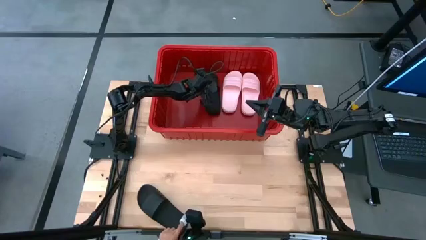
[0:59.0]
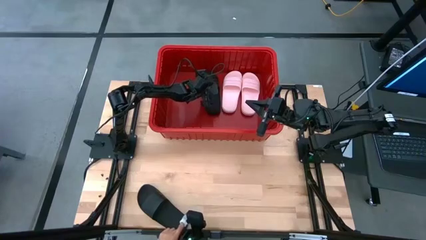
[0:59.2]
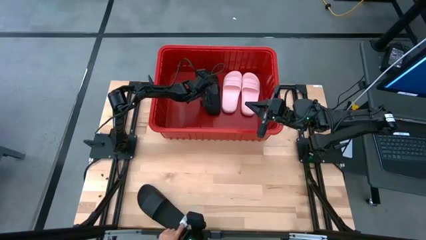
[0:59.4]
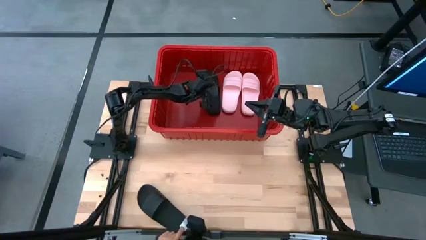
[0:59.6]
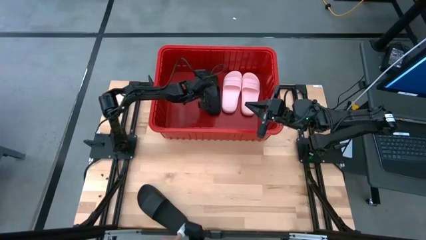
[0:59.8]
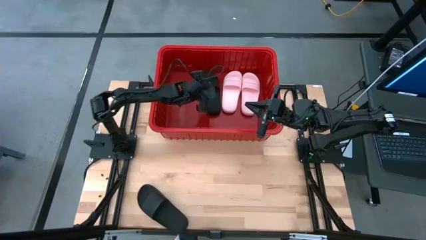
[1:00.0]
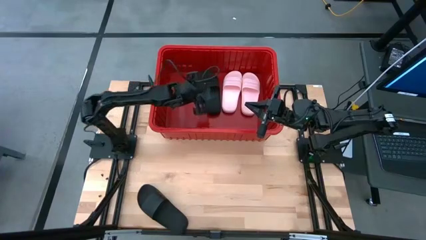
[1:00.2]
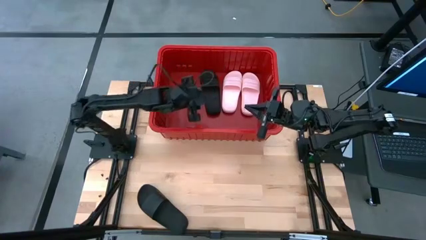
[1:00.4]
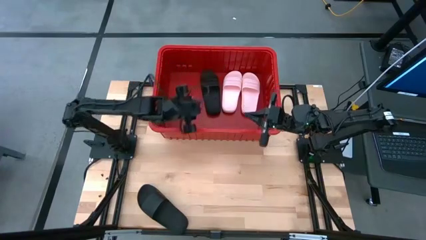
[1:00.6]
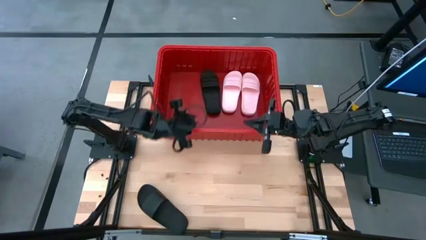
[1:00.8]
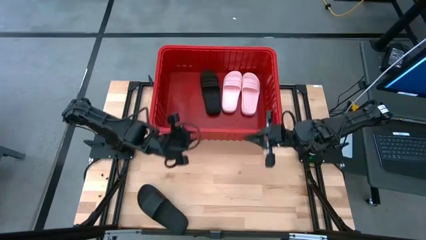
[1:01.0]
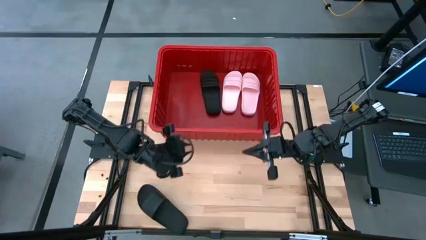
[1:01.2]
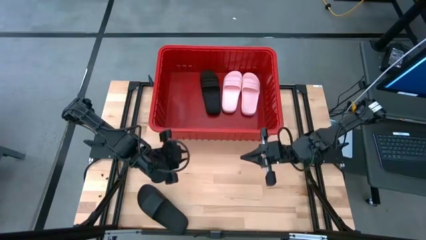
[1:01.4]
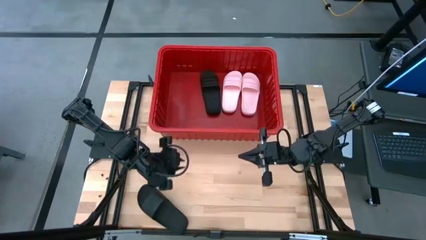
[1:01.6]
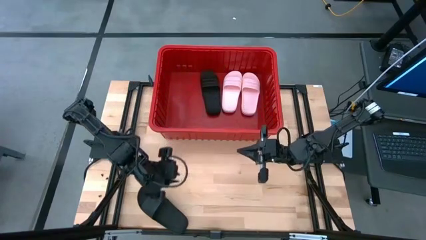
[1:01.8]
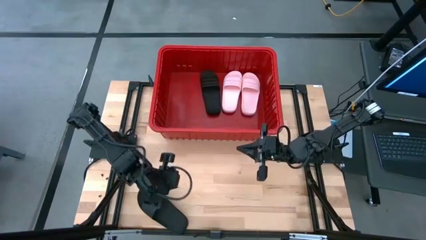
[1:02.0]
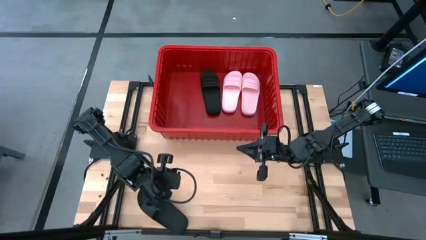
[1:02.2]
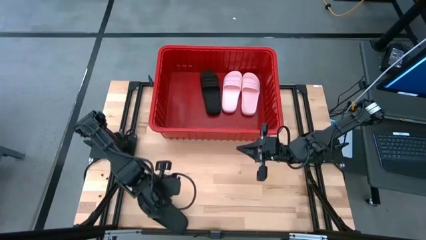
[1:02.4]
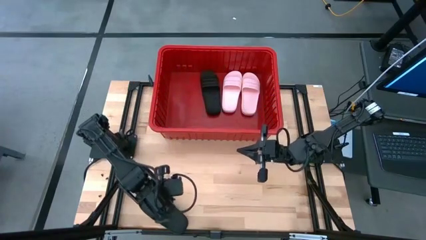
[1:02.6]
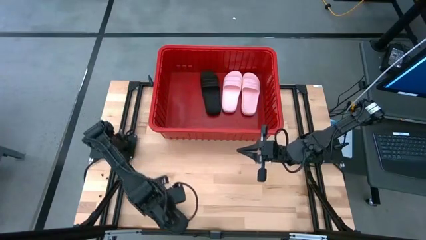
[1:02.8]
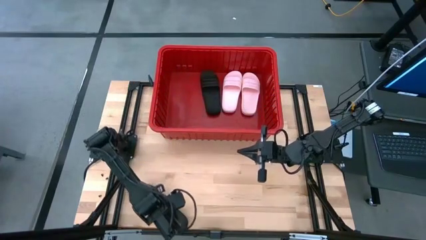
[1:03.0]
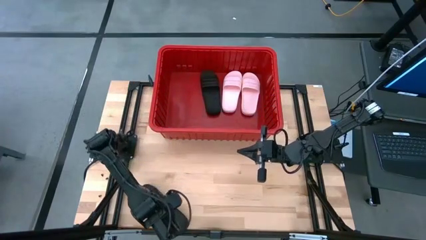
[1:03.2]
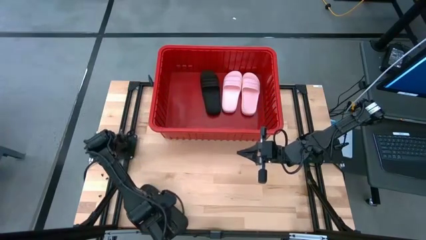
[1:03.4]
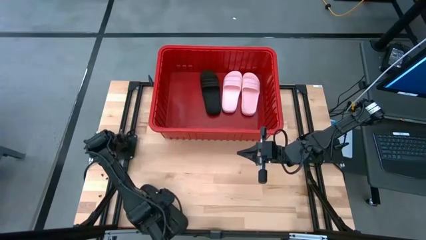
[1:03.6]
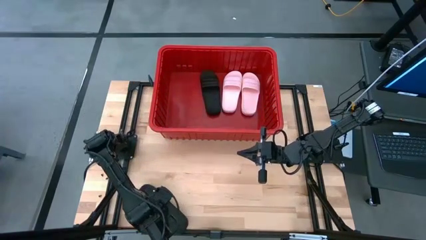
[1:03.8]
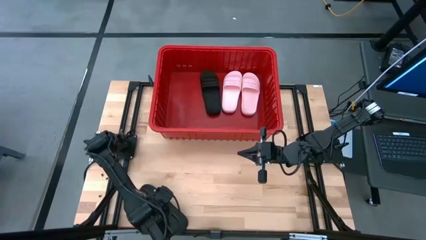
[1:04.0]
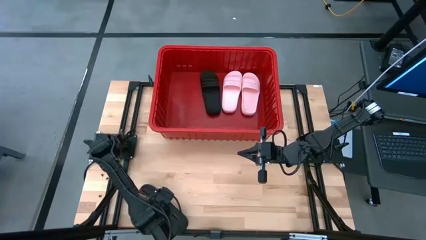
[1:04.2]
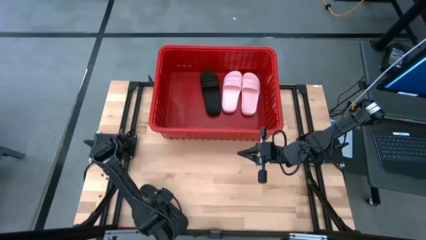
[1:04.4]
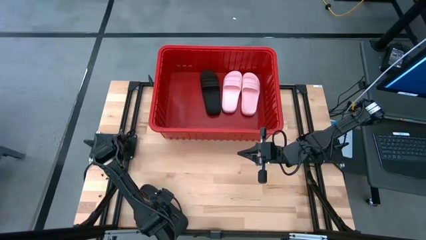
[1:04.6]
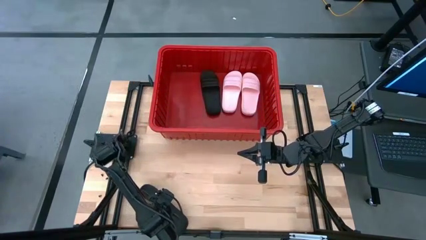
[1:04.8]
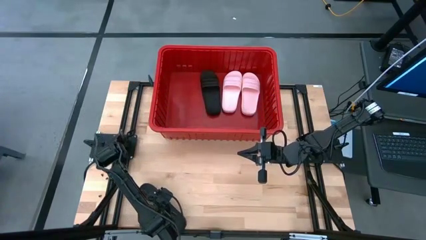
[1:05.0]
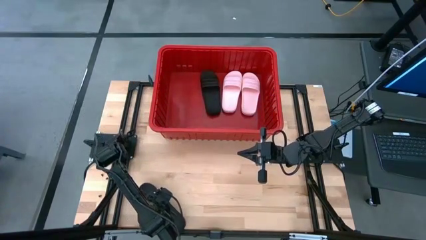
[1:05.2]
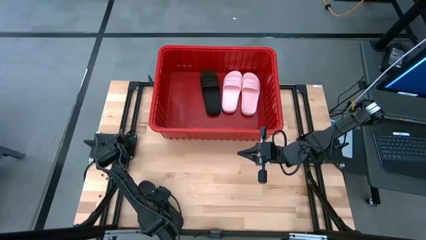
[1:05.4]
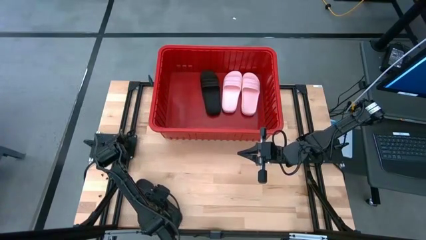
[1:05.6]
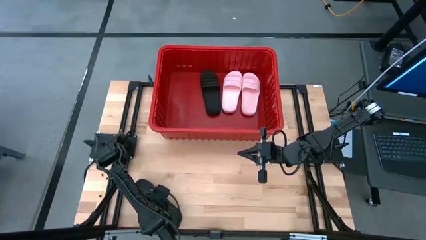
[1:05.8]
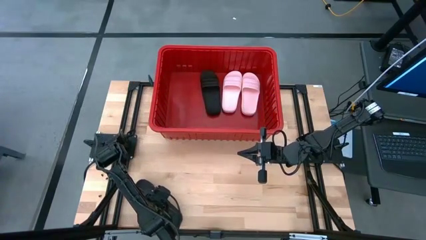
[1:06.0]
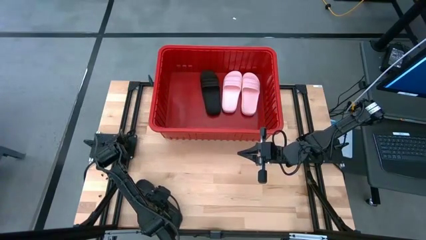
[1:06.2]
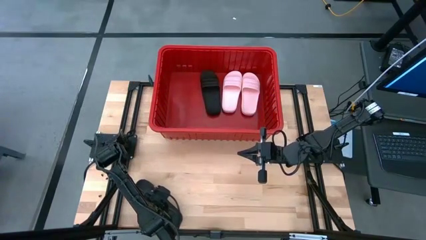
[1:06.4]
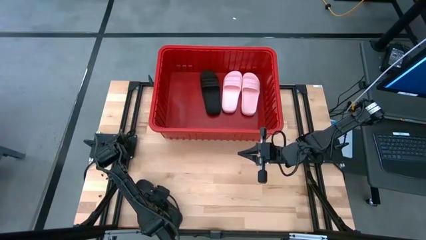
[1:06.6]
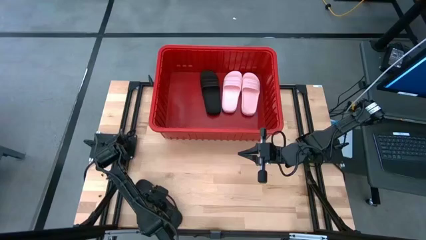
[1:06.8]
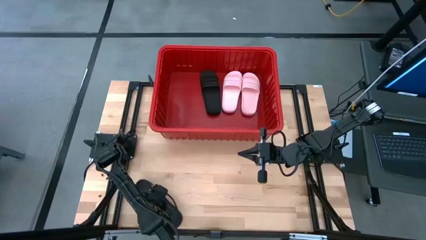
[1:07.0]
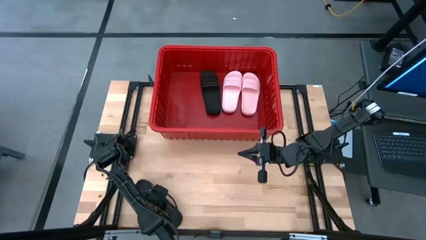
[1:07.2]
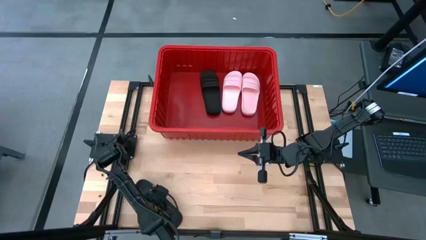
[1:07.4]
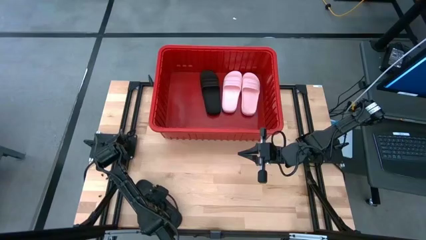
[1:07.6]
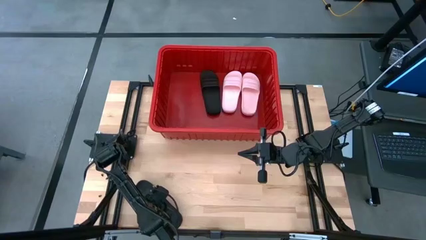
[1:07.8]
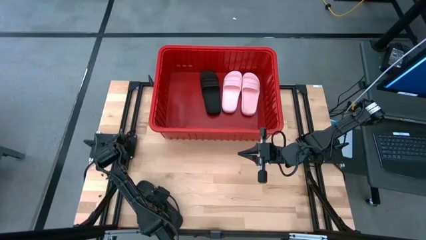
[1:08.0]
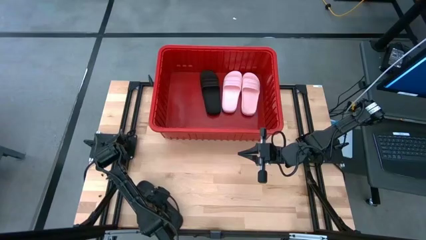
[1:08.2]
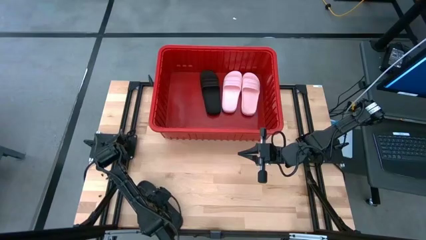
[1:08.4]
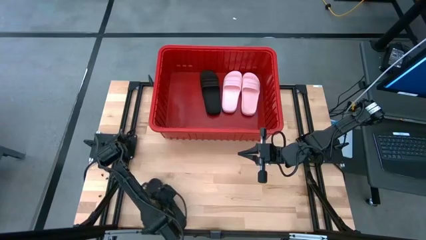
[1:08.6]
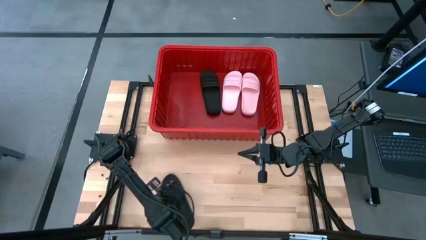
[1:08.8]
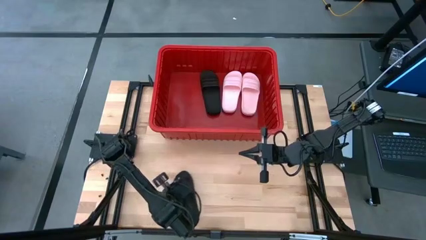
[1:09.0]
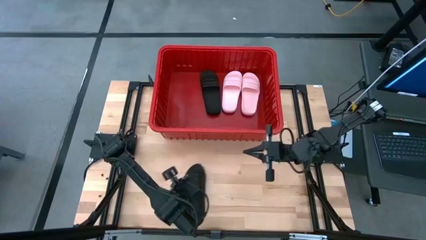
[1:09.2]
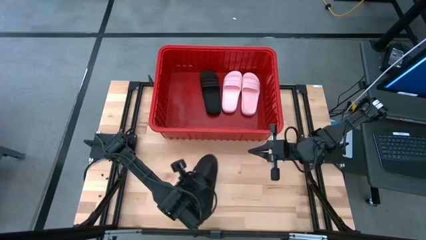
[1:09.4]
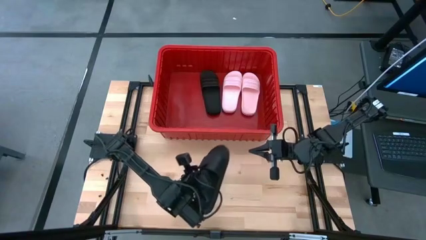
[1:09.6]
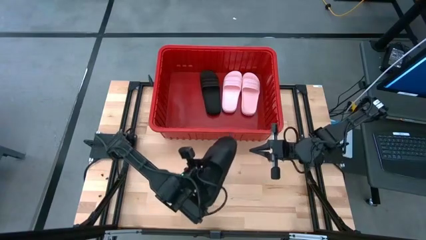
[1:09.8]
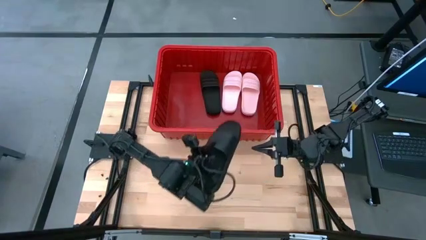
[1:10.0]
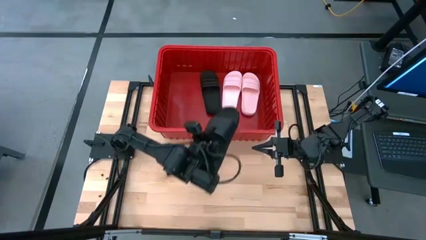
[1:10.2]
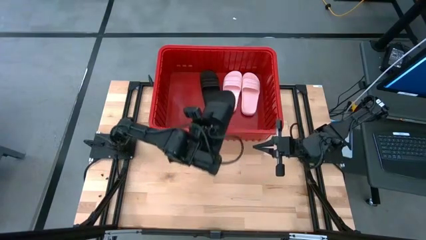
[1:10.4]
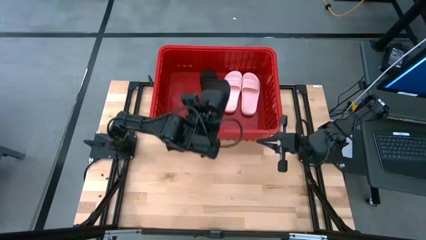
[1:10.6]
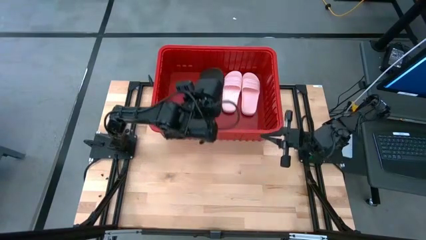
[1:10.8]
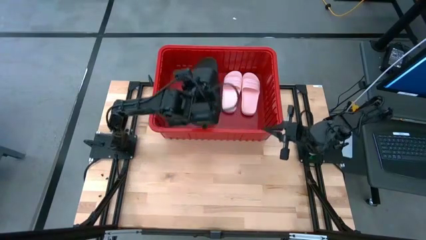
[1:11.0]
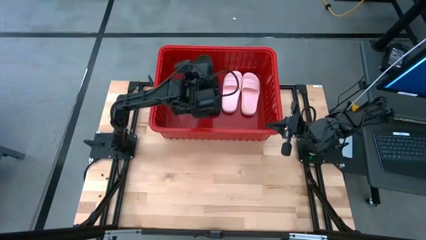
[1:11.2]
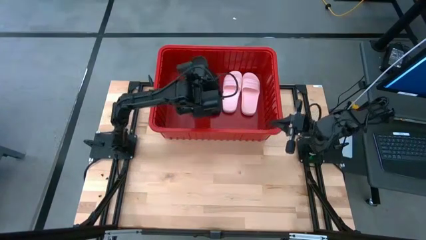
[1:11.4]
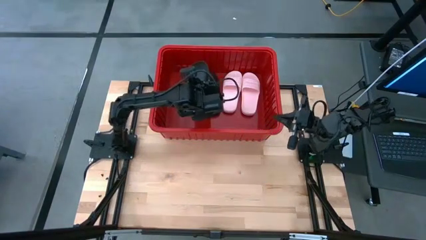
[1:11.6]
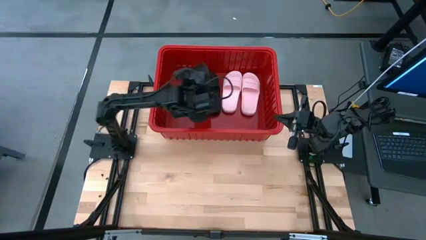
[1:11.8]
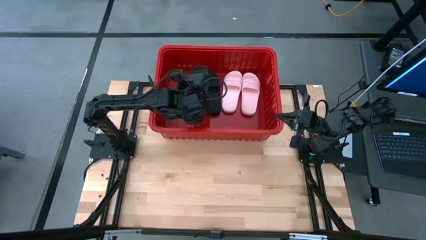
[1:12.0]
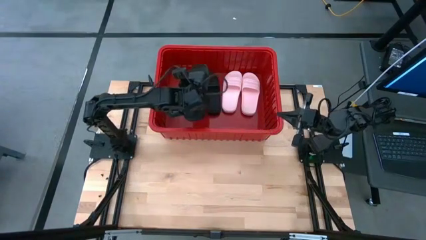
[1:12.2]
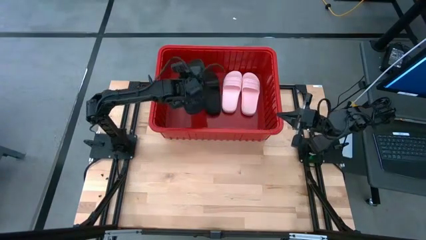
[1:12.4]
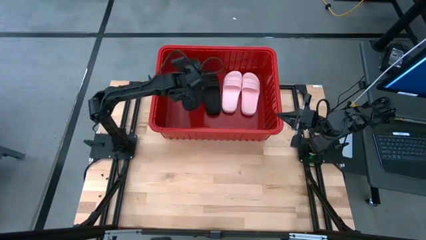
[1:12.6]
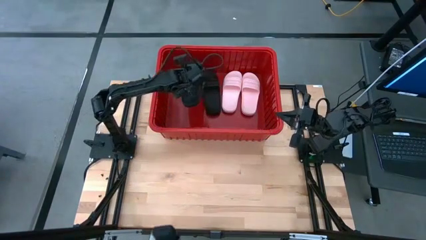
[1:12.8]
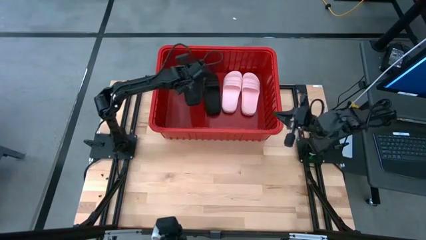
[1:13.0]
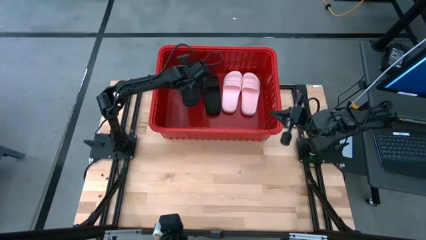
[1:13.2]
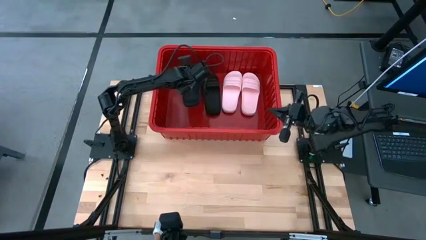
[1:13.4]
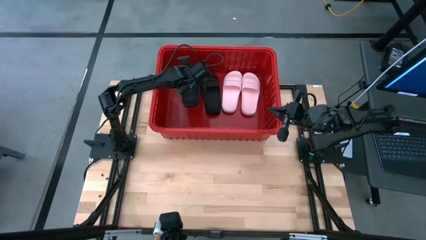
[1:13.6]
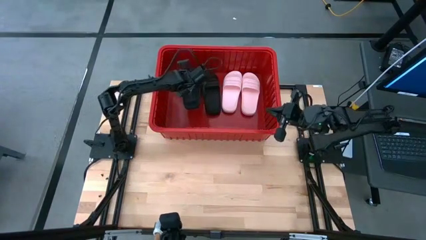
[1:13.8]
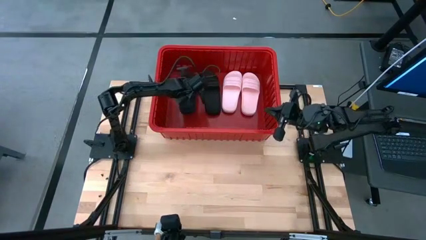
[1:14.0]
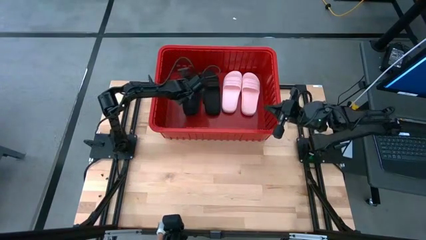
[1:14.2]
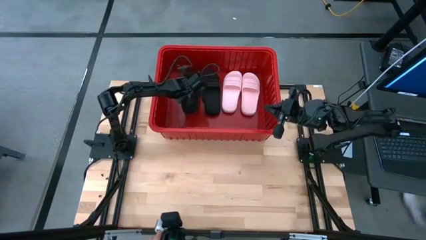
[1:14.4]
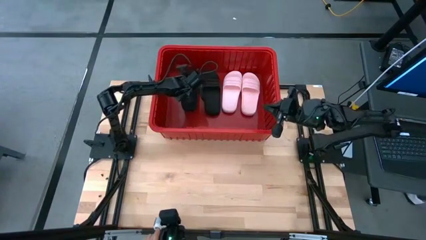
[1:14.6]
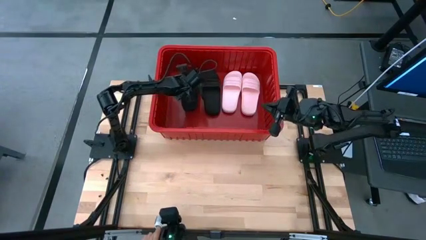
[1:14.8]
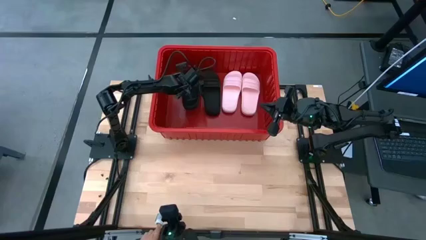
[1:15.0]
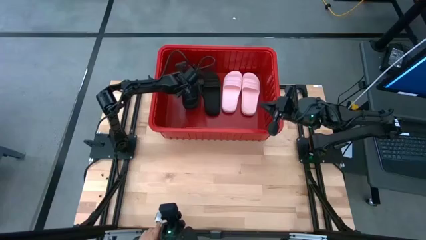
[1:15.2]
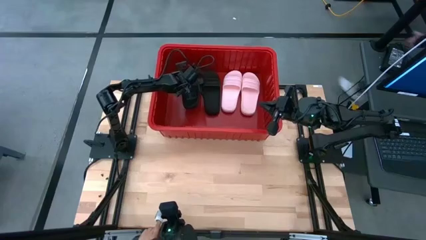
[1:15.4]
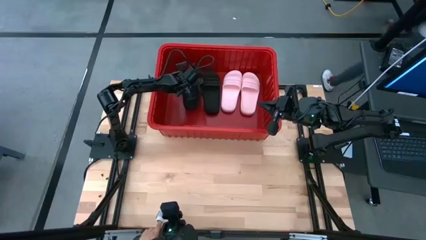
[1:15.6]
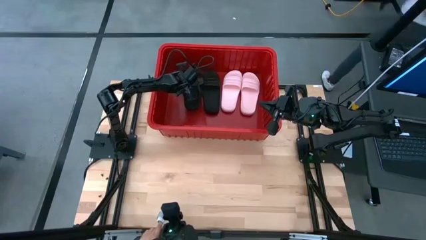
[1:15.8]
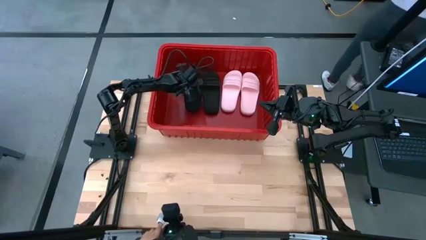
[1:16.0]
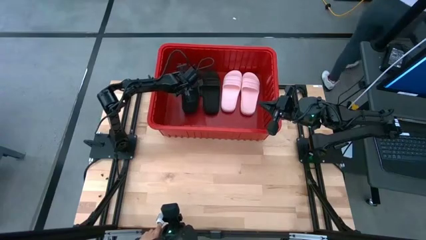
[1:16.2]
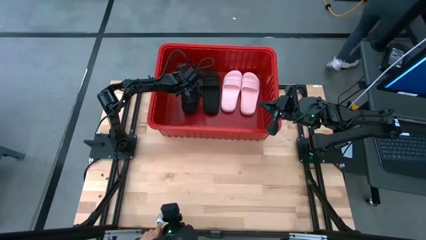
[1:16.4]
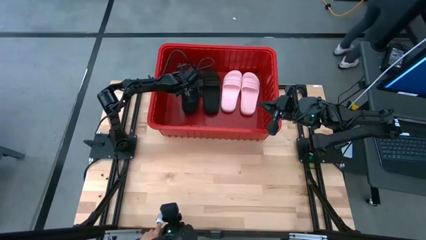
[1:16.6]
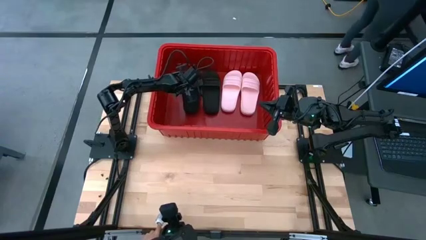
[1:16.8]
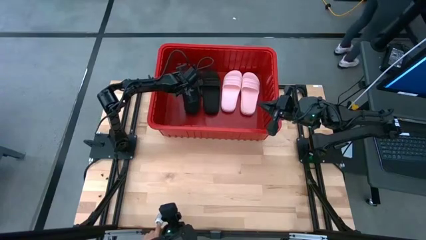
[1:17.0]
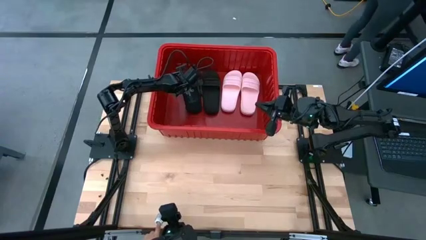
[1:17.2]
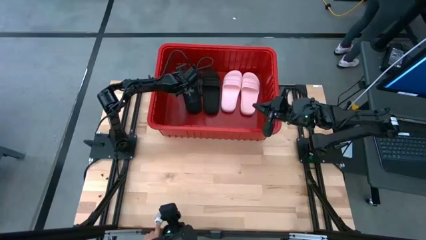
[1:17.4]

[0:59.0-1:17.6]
Task: Pick and place slides into bin
Put the black slide into the red bin
